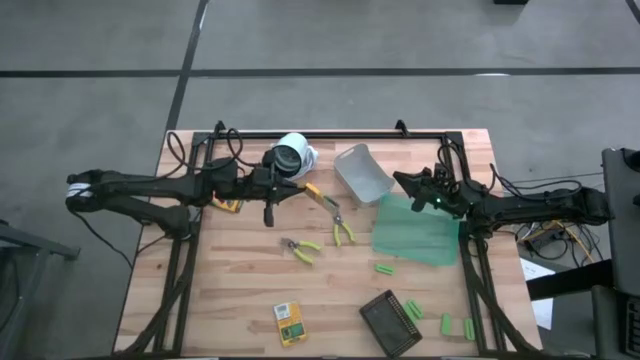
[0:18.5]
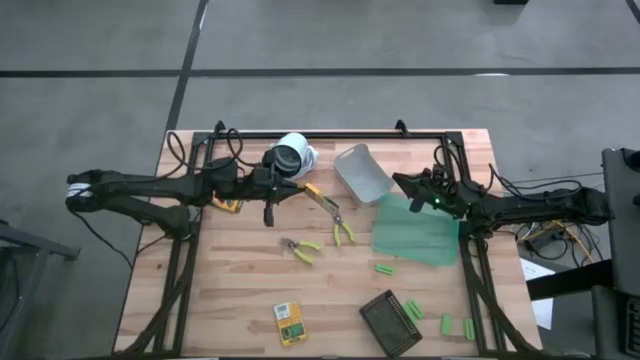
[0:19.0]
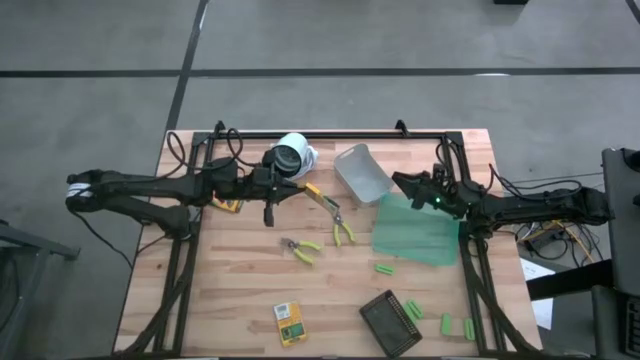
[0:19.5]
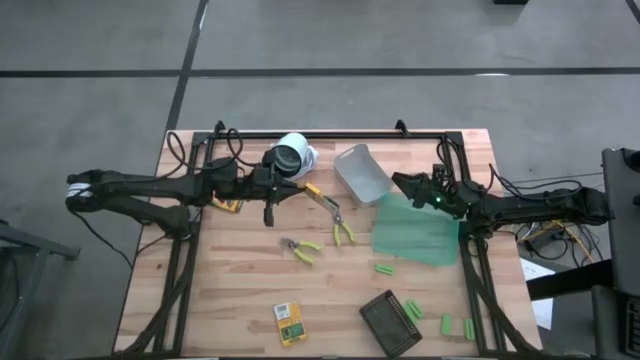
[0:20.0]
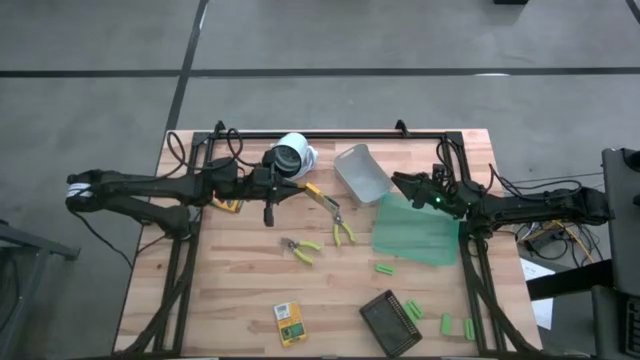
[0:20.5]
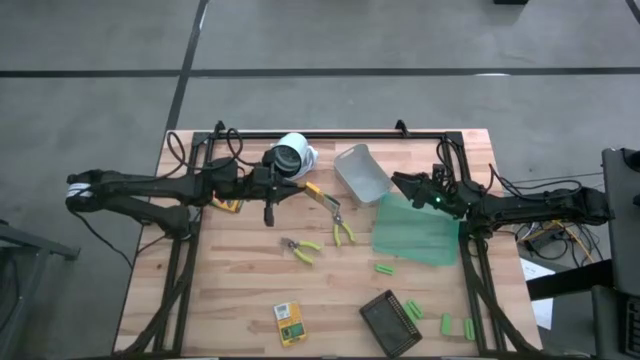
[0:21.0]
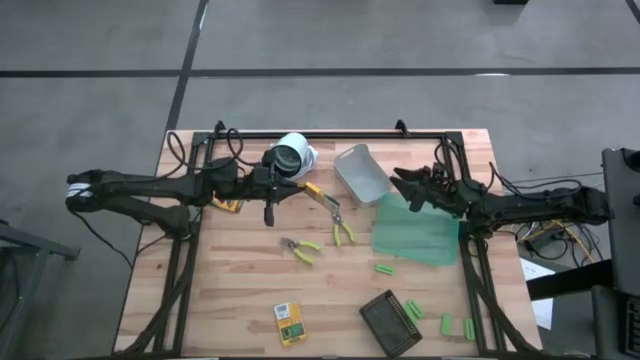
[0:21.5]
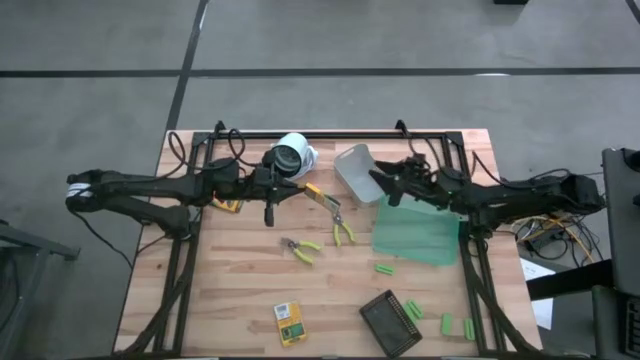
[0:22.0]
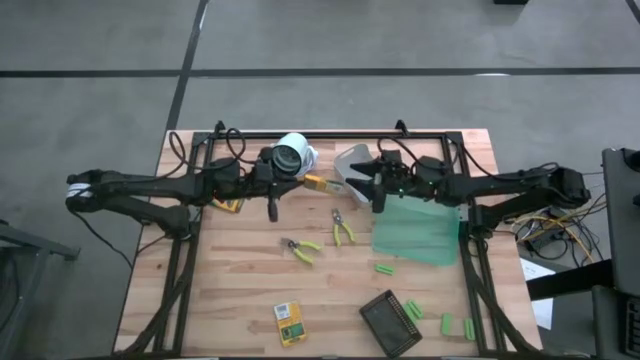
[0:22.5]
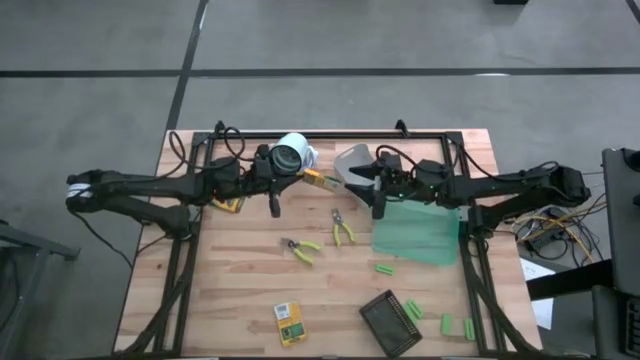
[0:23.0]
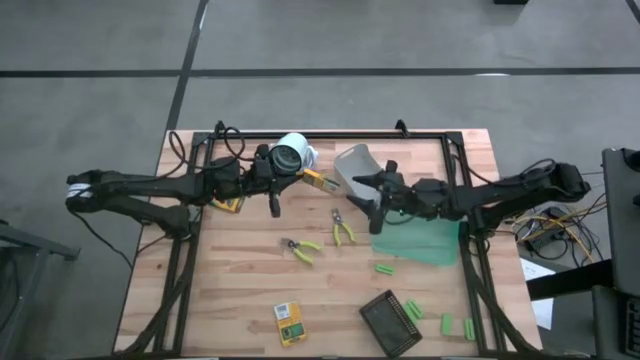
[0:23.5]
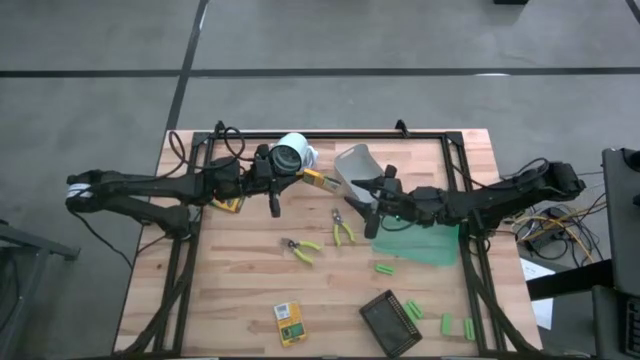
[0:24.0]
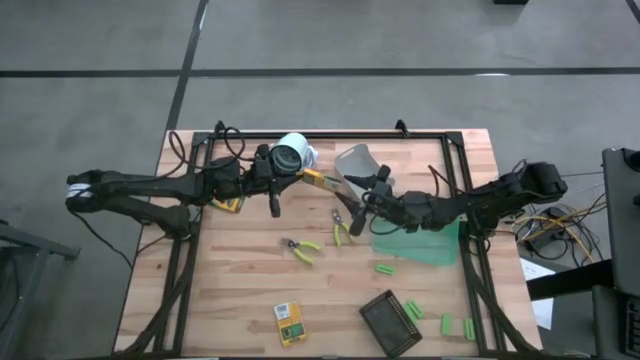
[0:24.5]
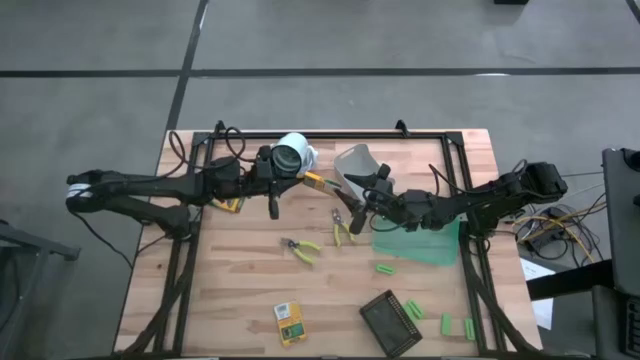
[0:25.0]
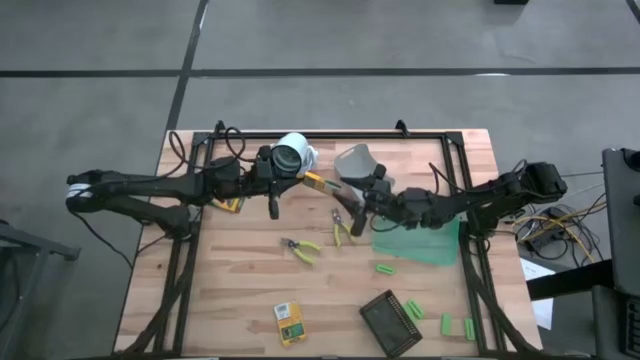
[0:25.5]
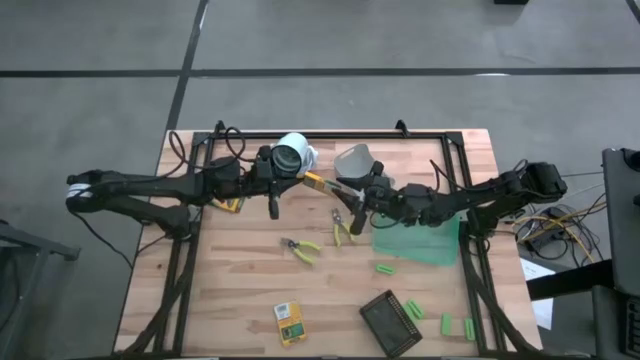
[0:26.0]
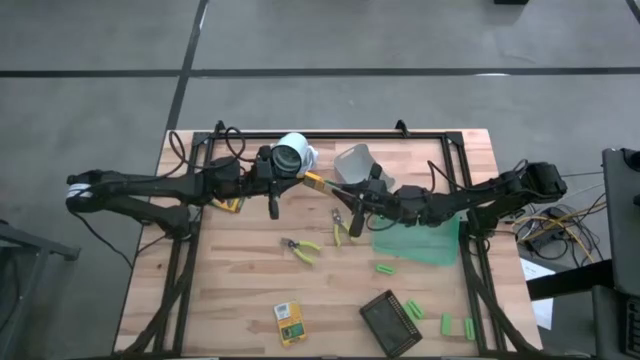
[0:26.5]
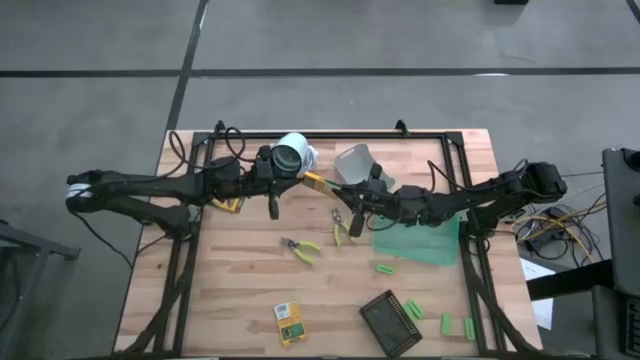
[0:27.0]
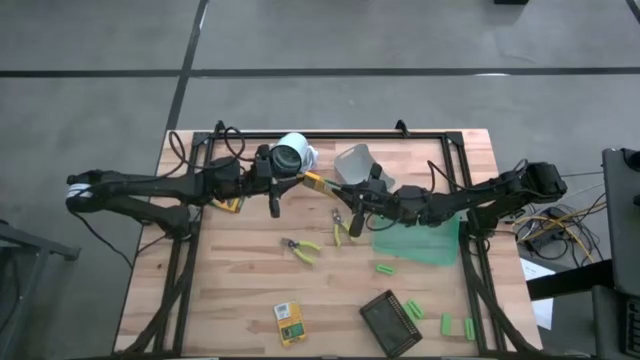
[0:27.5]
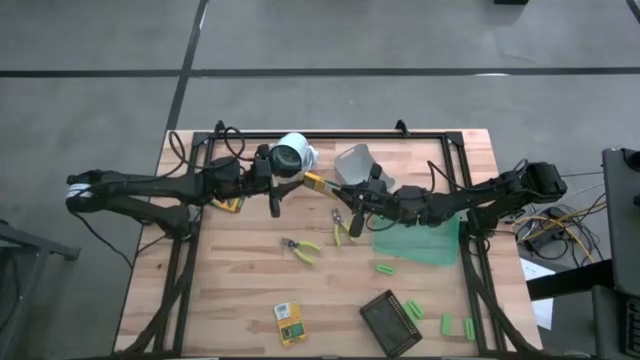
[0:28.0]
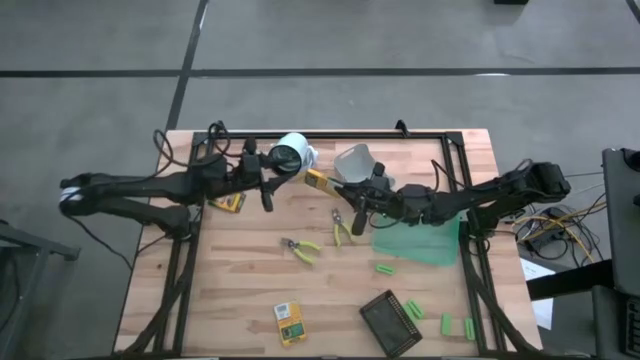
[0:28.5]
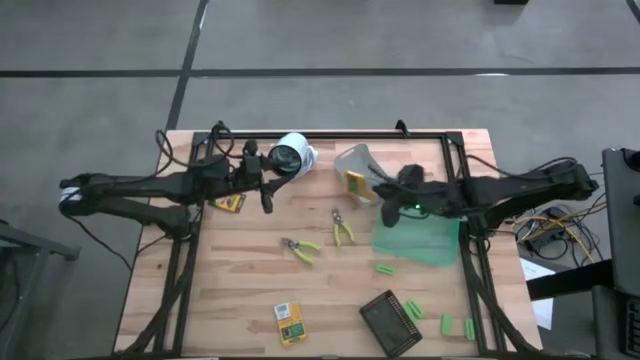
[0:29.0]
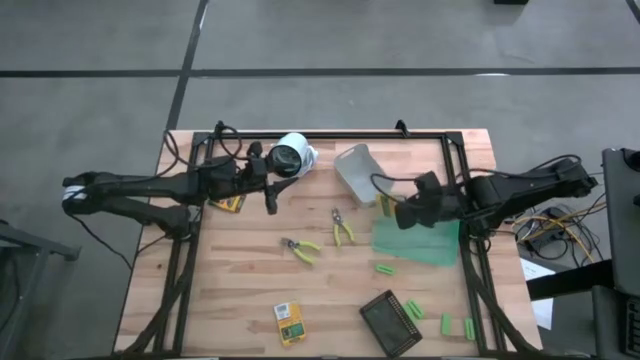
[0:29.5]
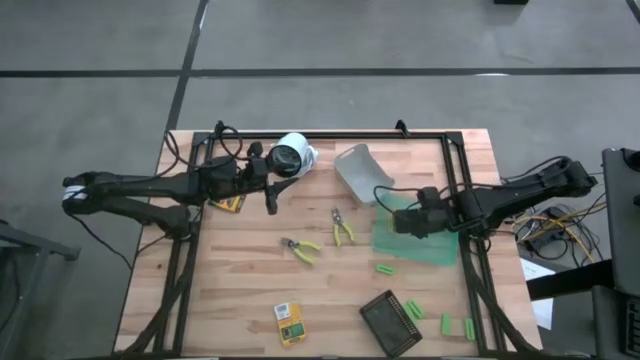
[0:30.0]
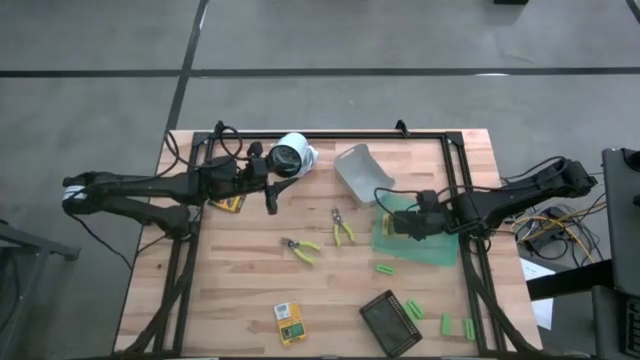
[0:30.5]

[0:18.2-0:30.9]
Task: Pick & Place School Supplies
Put the yellow crayon box into the green bin

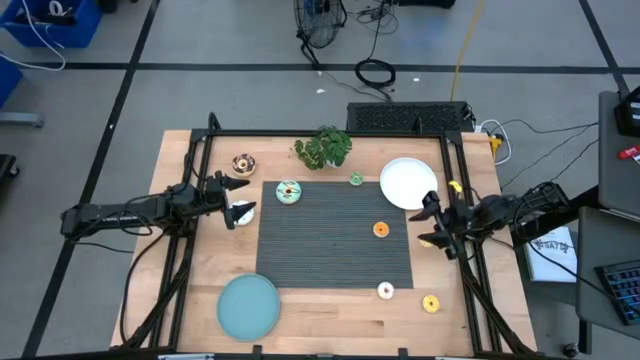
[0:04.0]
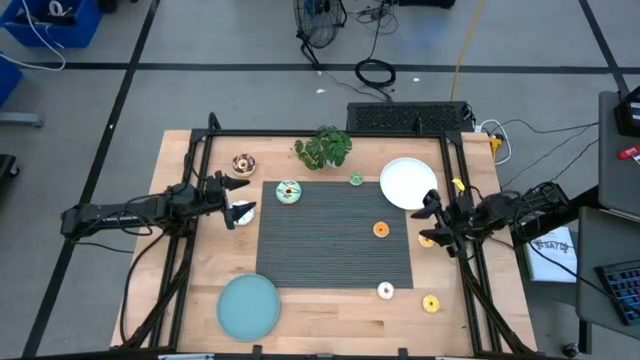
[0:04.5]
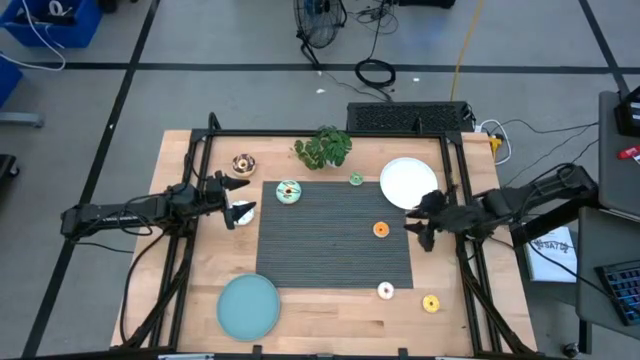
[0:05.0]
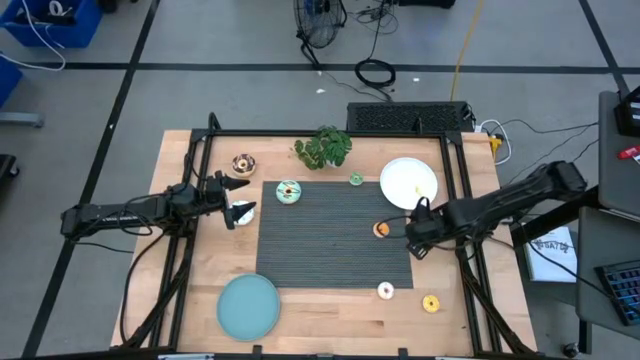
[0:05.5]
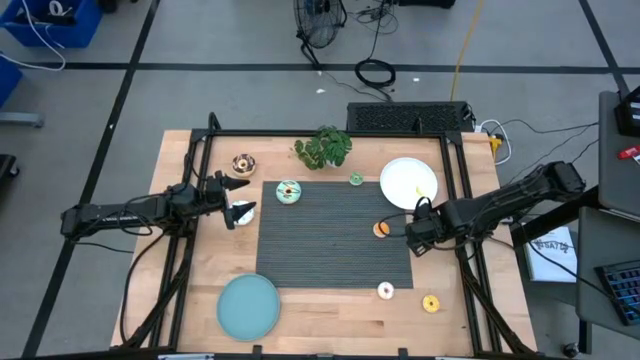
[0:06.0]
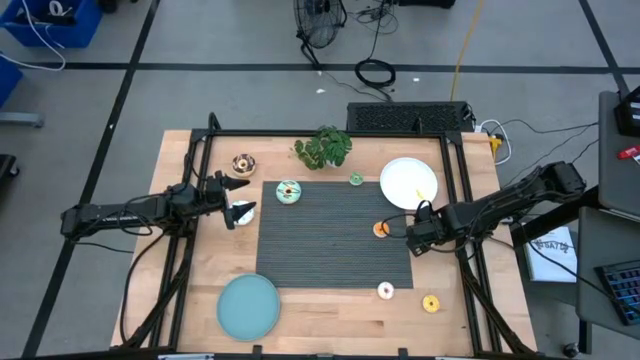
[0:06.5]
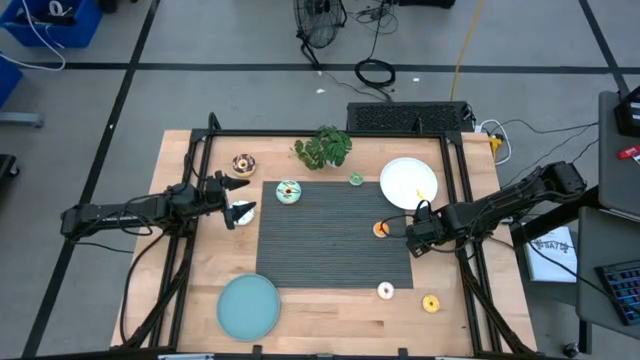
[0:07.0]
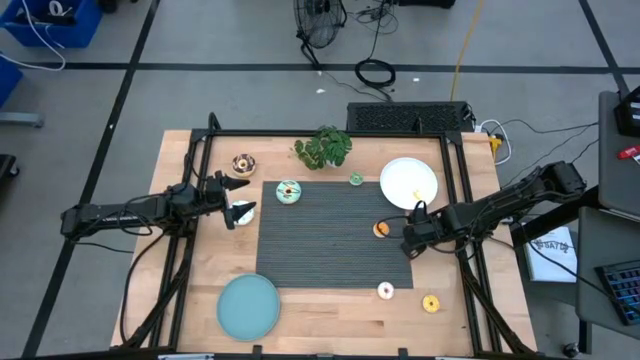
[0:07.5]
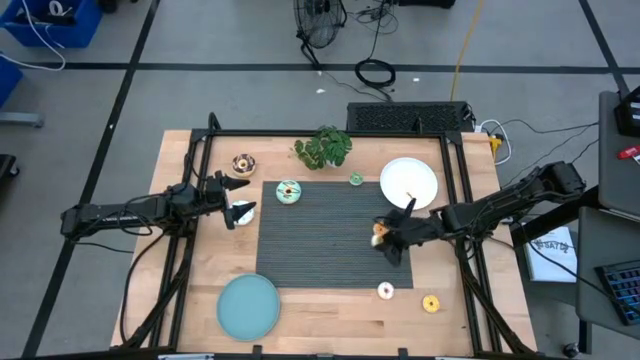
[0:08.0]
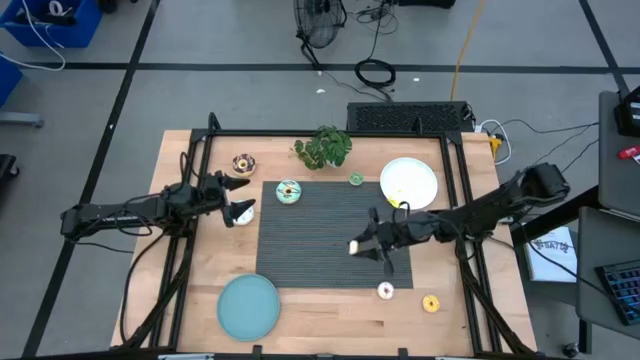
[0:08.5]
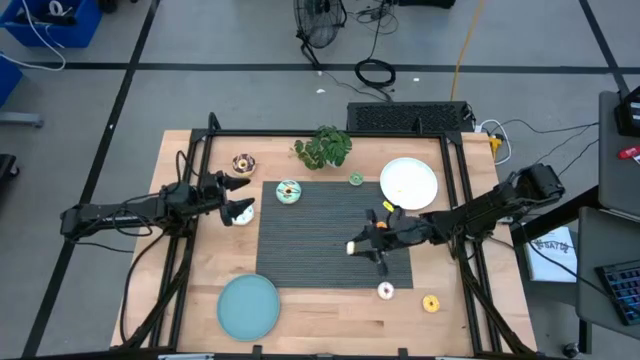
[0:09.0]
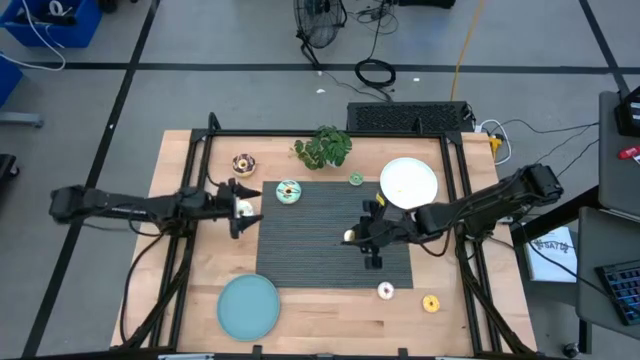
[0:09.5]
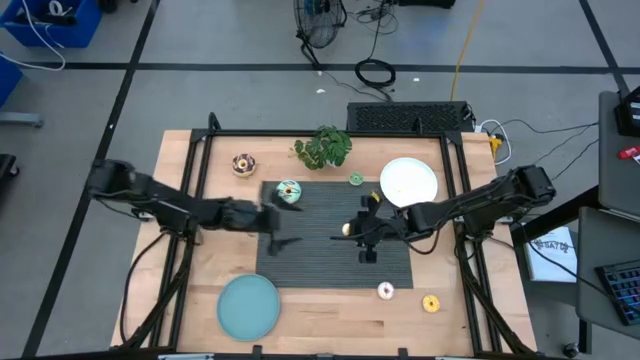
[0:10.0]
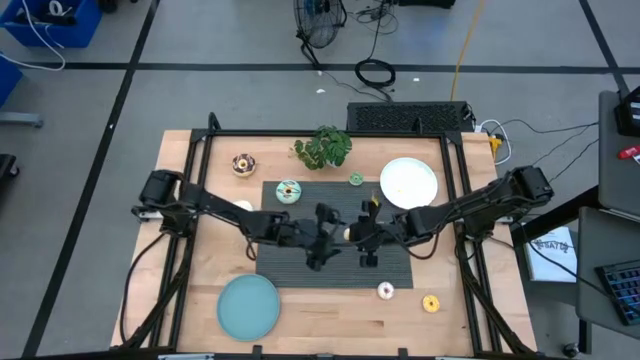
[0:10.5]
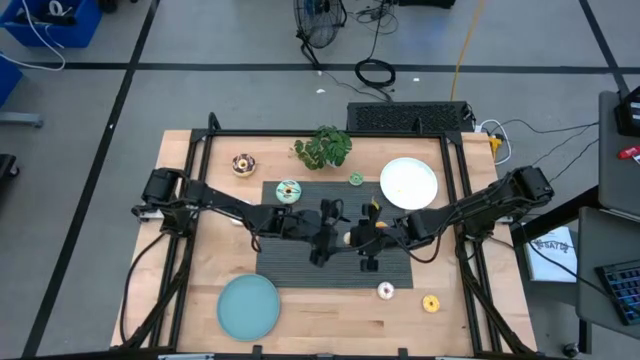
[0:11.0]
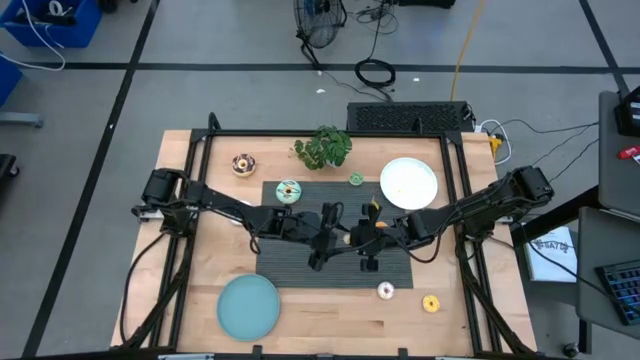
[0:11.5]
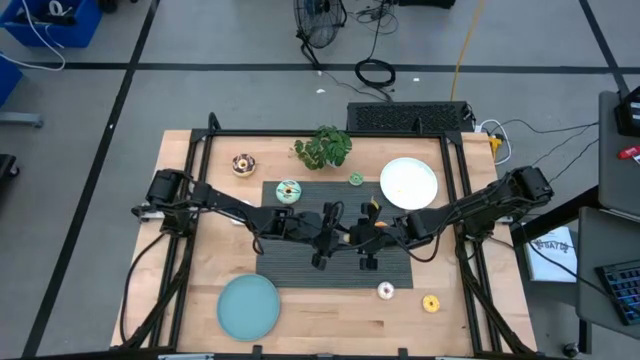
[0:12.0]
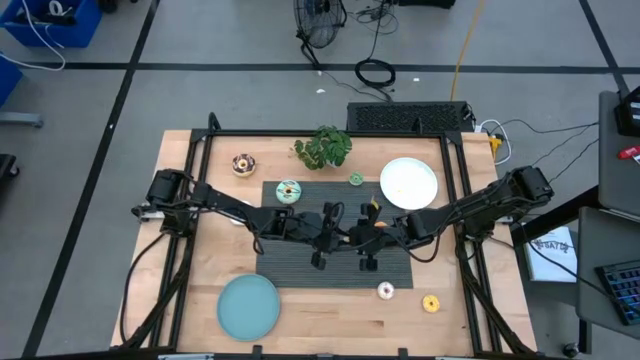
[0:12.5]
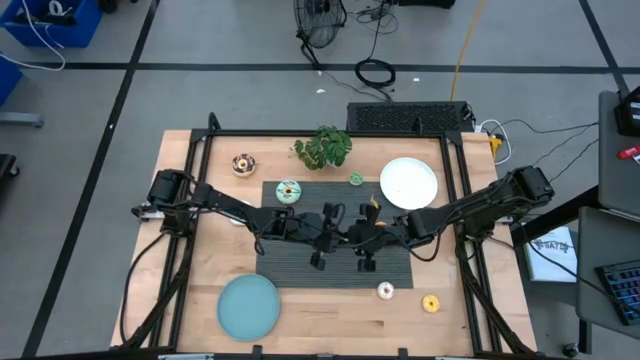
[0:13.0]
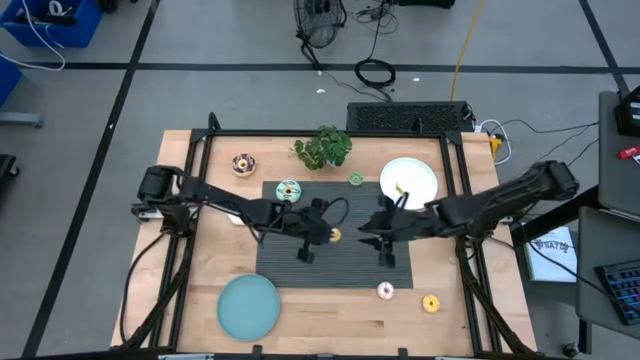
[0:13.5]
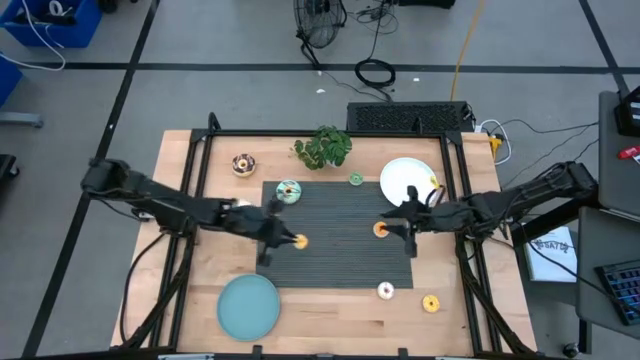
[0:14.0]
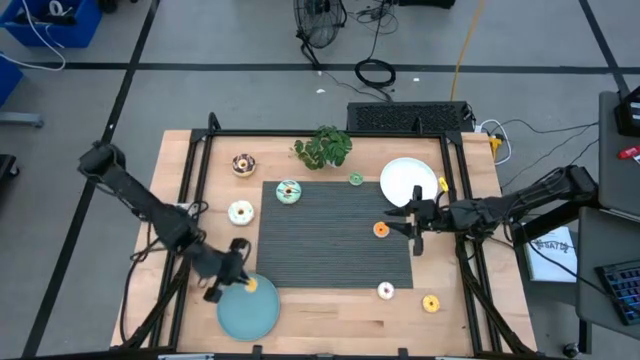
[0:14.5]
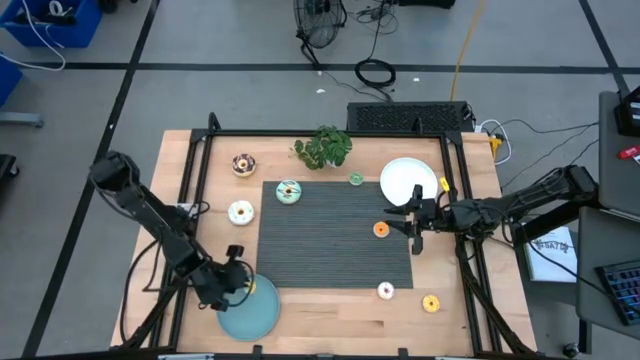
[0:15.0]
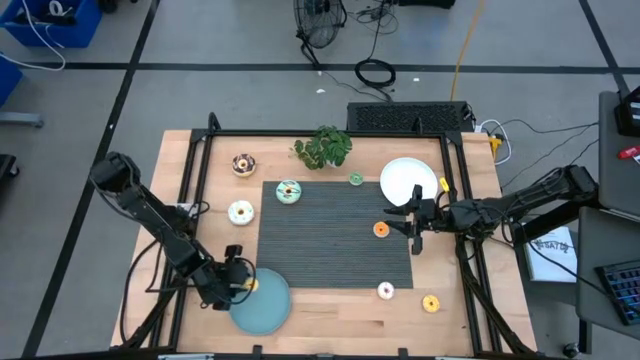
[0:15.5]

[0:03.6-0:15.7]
Task: Pick & Place donuts
Put the top small yellow donut on the blue plate
